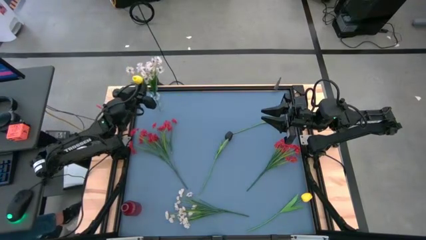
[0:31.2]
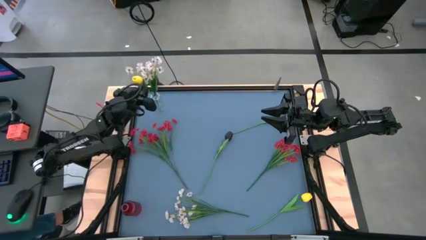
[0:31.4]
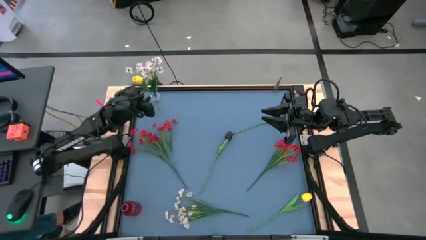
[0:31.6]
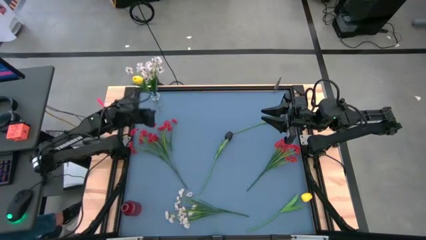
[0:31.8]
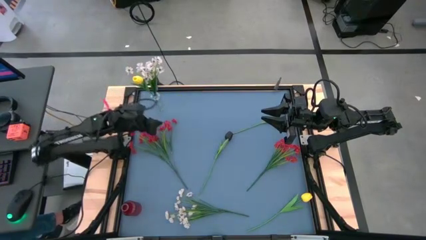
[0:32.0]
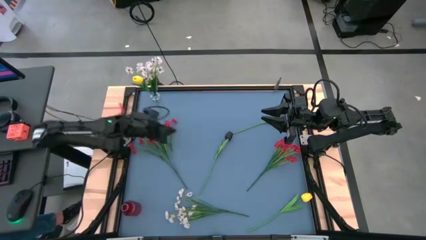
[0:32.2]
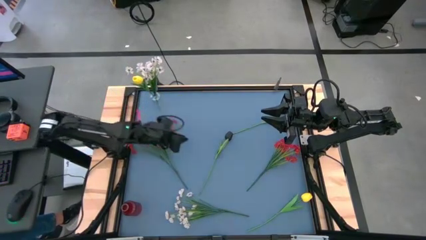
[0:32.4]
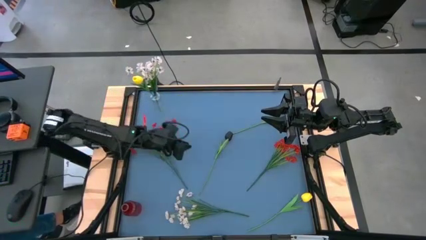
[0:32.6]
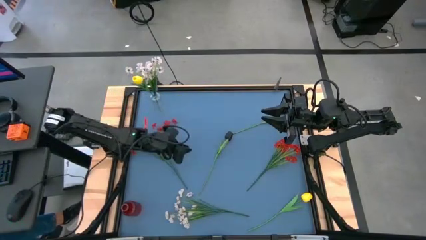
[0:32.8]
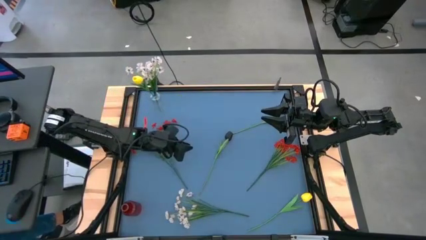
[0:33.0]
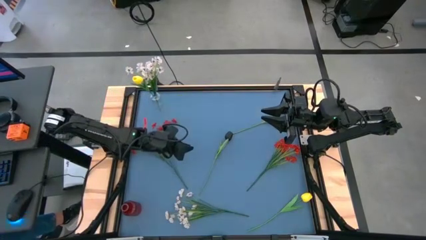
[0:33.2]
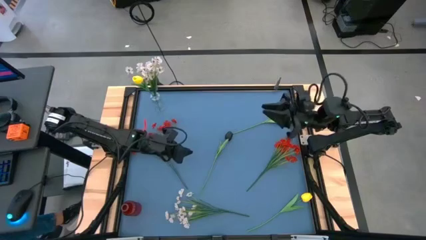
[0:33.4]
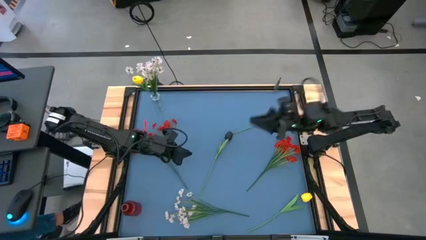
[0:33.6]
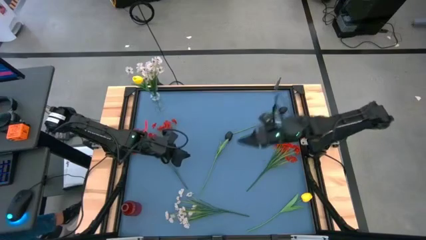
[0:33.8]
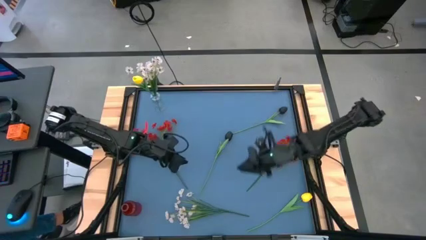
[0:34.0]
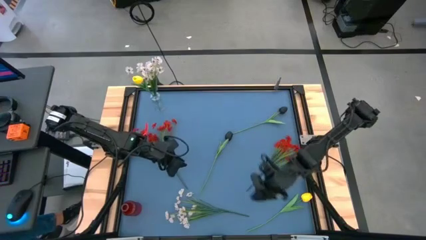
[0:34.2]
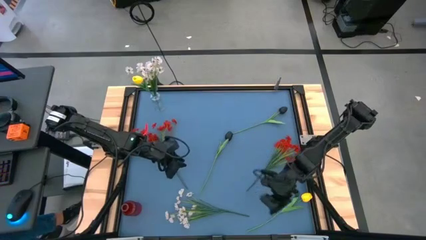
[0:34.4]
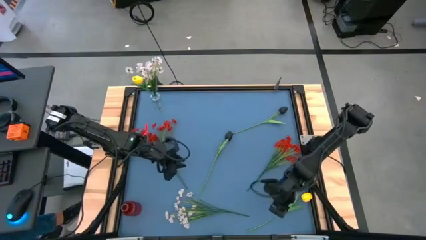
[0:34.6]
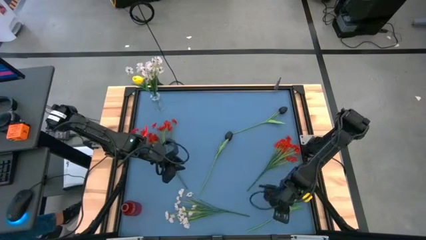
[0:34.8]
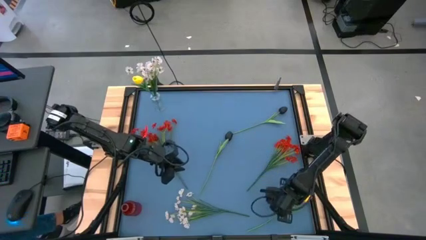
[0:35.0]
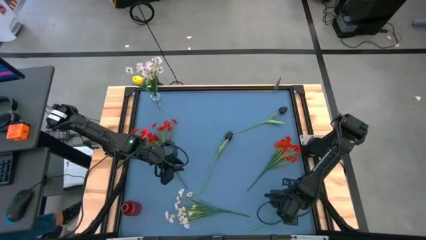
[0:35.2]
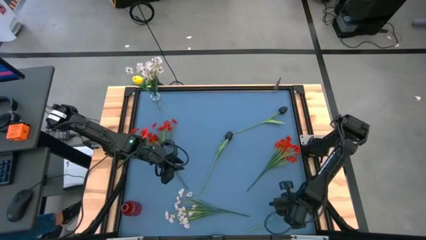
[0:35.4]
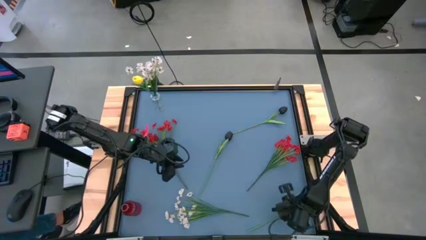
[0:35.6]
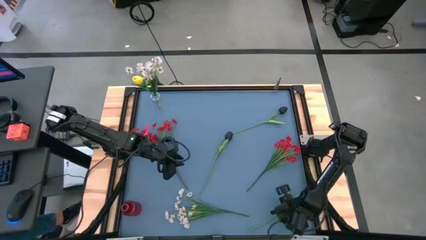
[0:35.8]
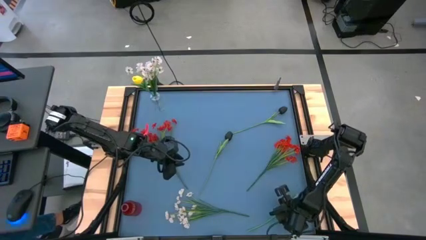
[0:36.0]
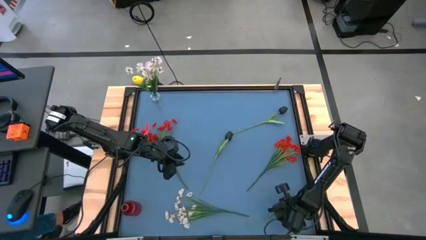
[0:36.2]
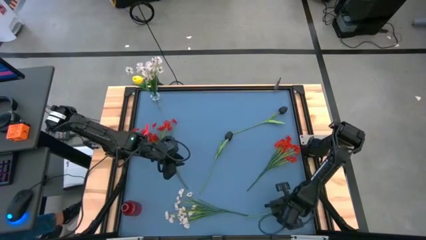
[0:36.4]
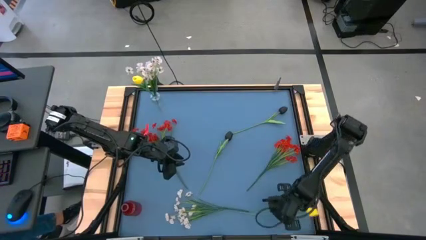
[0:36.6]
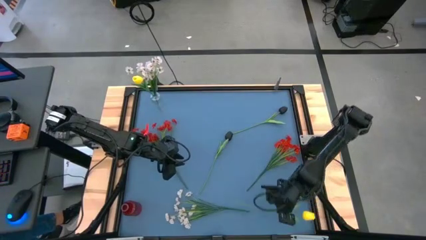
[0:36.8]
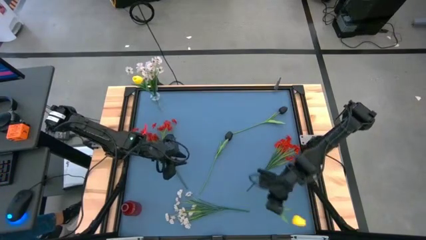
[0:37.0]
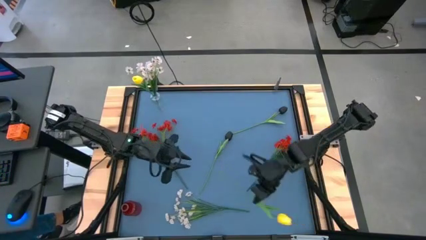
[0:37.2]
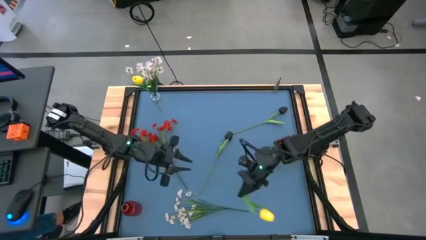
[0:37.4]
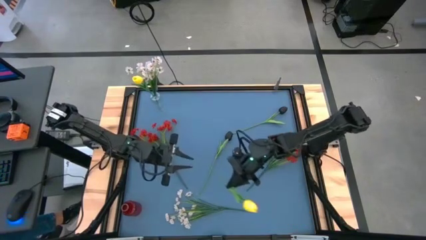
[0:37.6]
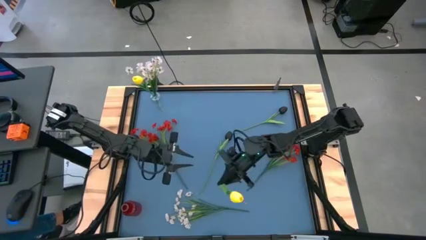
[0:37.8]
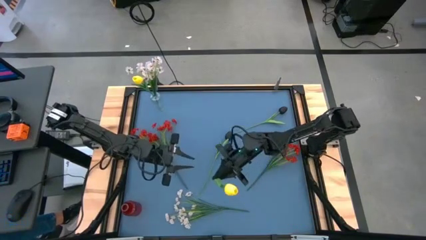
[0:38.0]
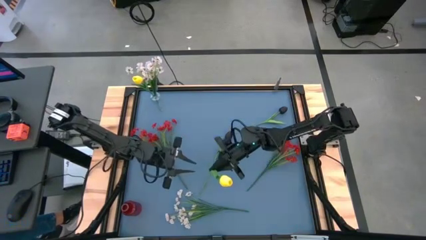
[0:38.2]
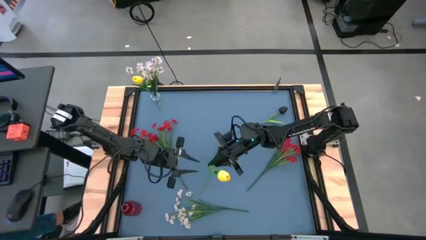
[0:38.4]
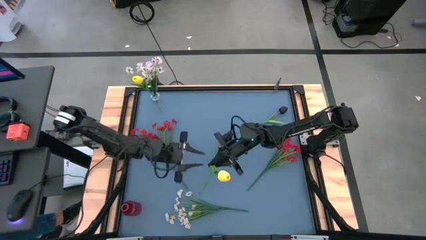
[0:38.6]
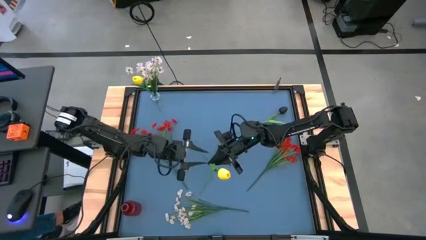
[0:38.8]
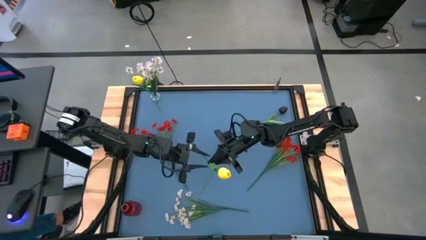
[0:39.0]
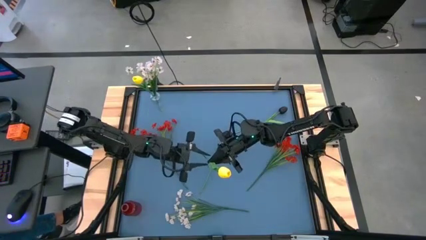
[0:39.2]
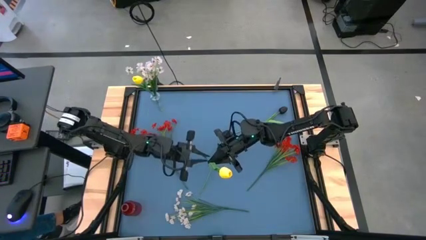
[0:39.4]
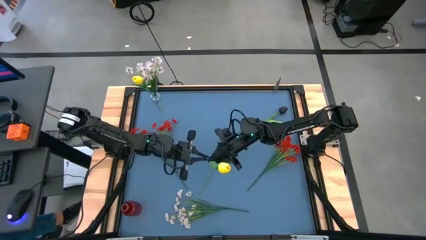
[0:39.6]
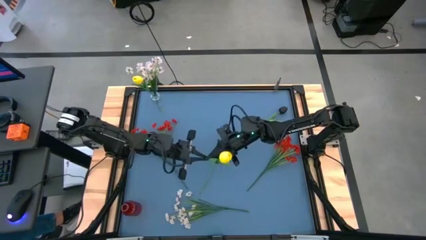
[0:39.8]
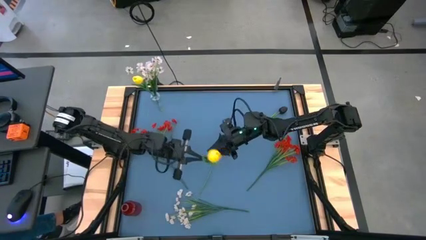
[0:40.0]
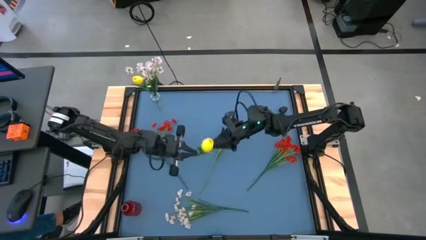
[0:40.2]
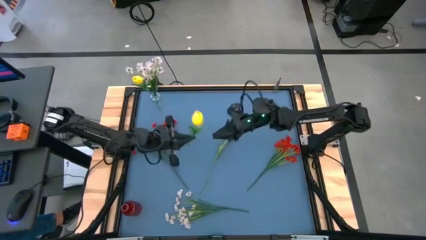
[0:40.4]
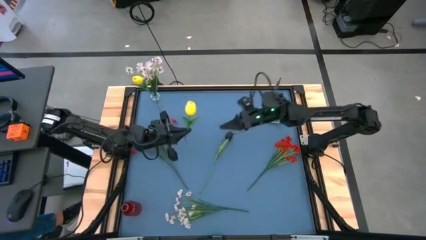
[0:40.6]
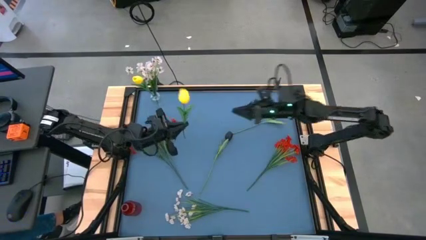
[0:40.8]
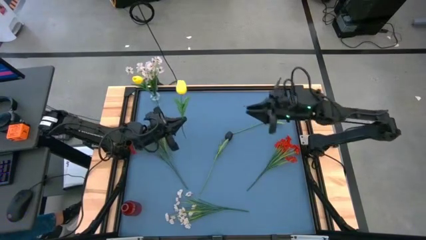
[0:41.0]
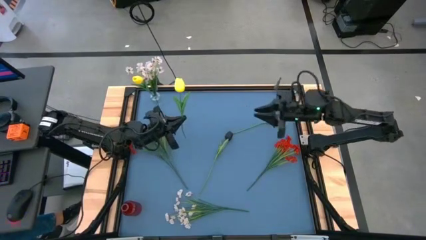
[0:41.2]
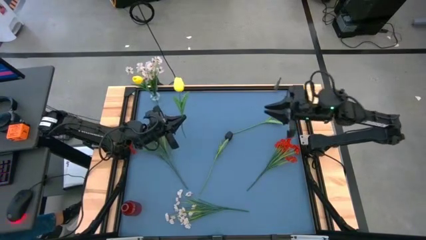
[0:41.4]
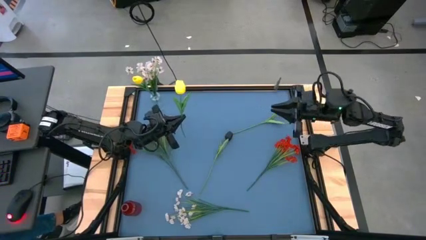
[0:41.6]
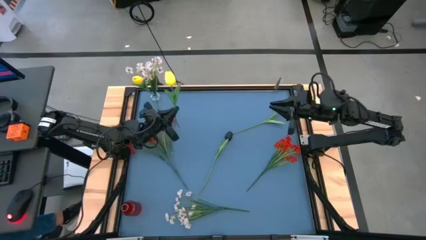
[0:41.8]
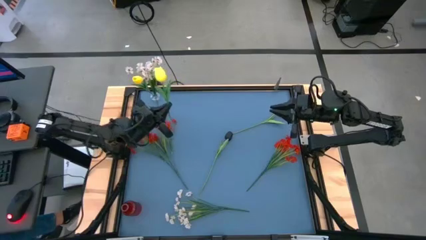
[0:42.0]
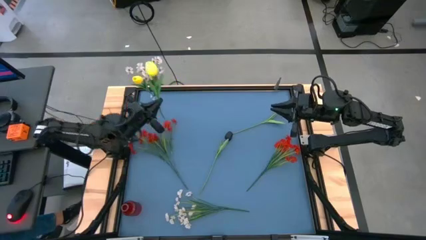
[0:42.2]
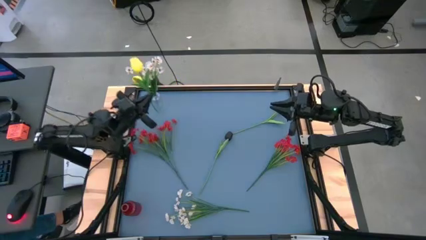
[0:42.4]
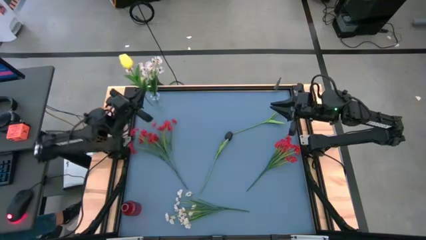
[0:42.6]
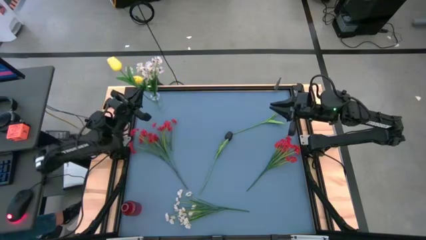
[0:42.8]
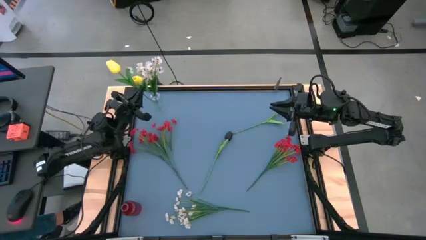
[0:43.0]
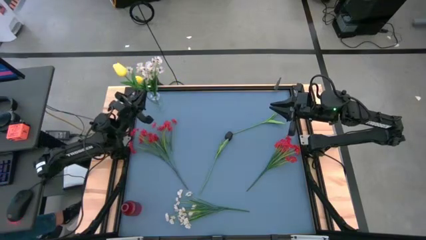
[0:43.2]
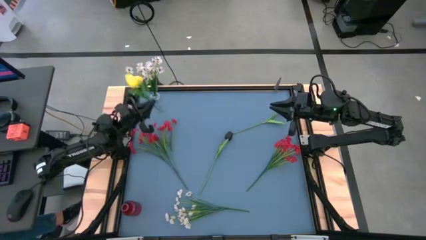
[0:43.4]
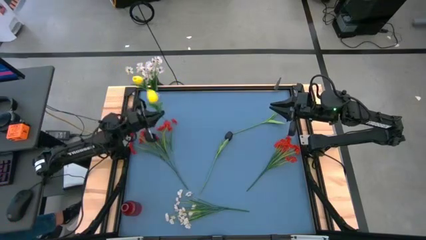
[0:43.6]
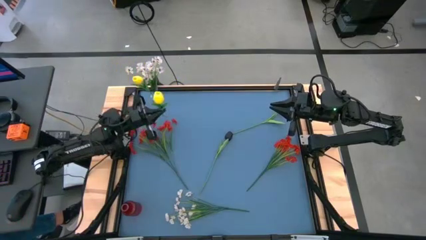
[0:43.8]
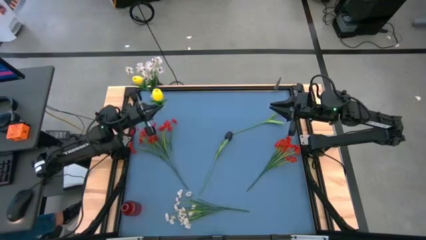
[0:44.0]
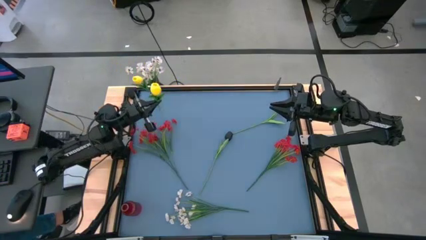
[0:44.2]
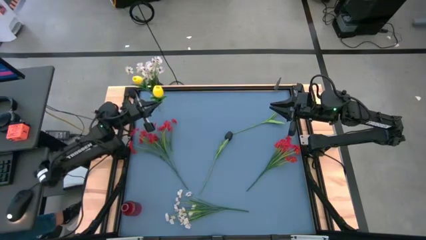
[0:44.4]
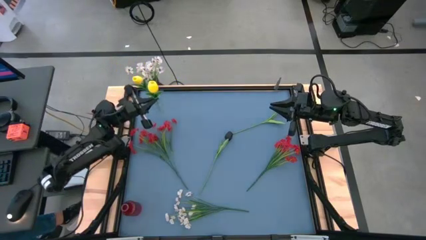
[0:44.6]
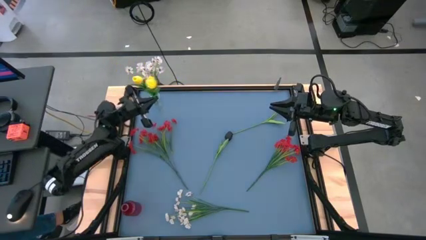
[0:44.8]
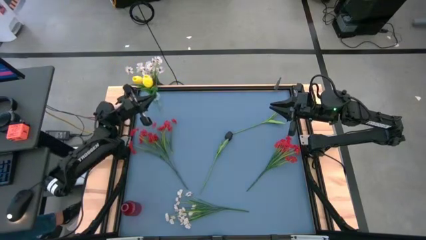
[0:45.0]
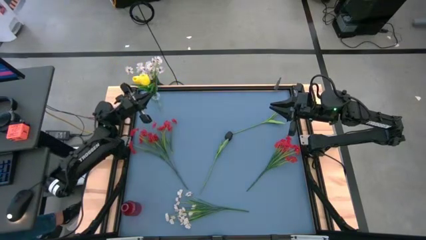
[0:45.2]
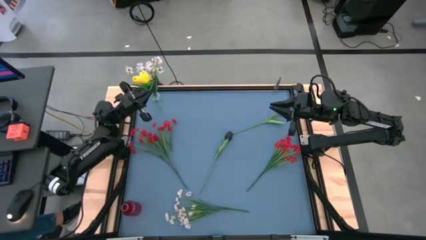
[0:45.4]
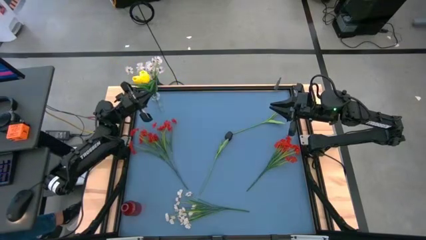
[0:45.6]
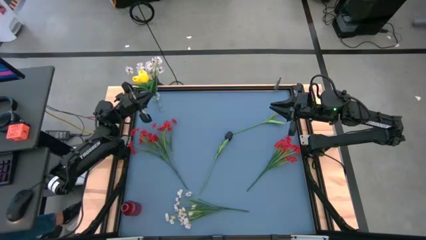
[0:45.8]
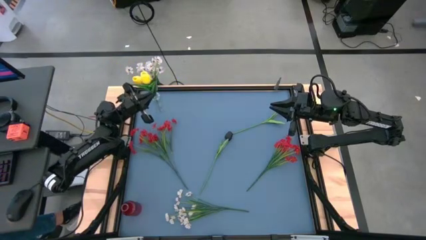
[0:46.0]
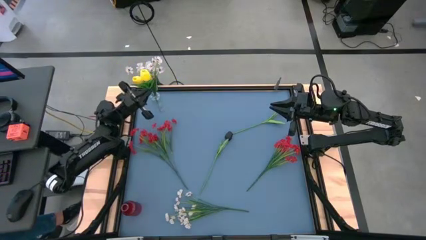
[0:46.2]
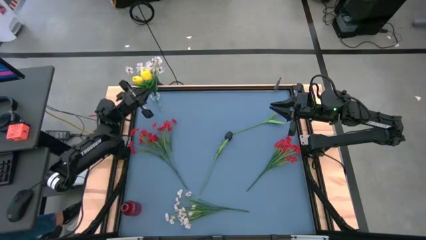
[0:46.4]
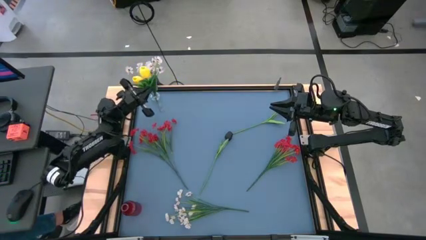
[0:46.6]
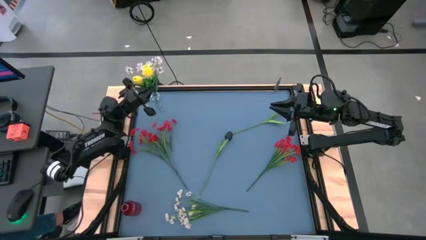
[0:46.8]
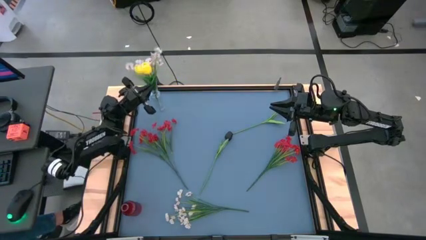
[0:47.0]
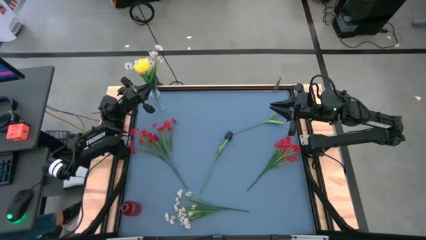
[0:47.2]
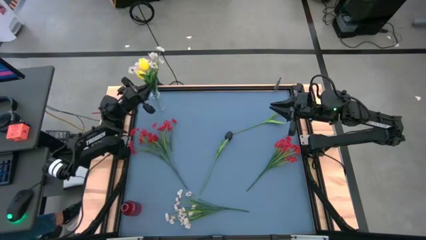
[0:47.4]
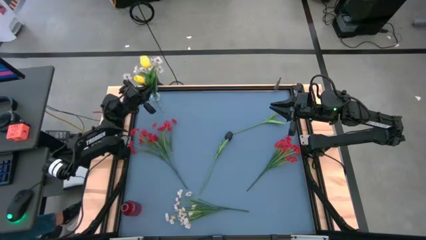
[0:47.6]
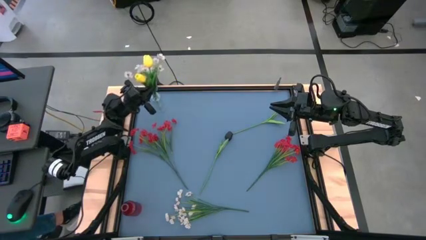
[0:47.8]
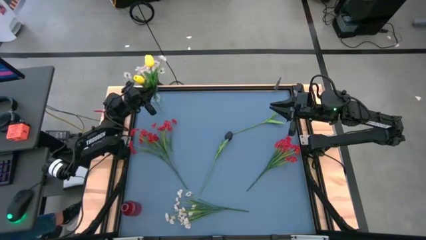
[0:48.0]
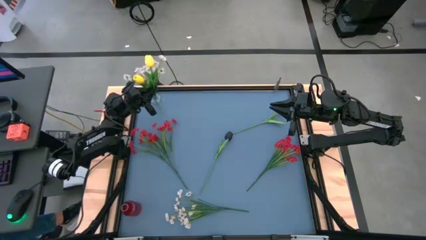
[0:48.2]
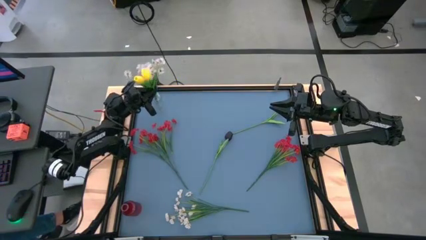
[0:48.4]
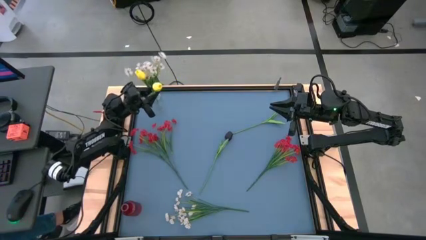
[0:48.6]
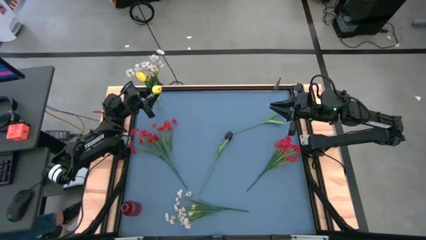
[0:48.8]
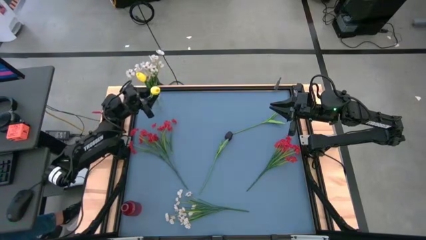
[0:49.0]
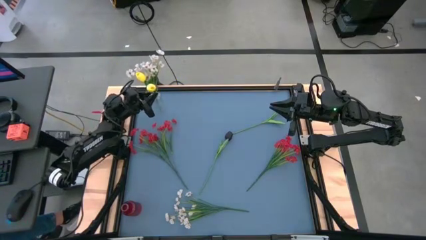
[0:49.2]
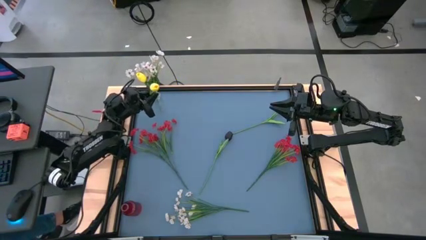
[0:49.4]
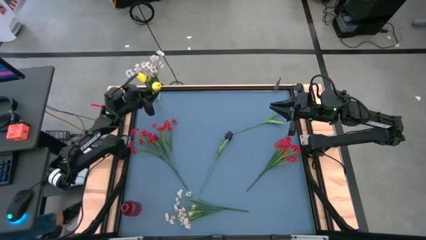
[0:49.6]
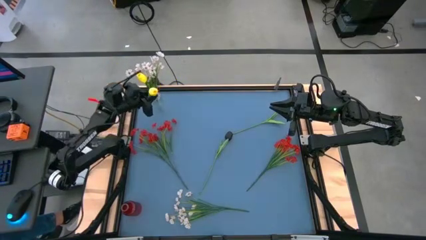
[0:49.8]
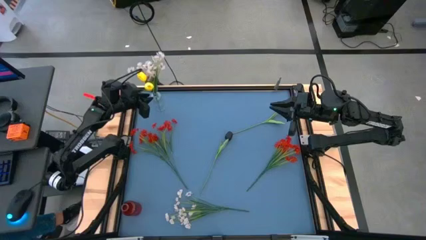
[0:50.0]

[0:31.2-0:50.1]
Task: Sort flowers into vase by color
Put the yellow flower into the transparent vase
